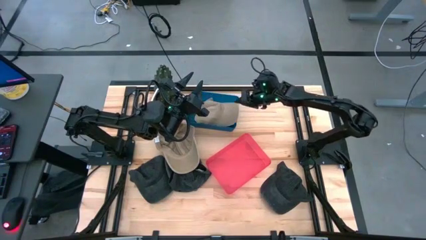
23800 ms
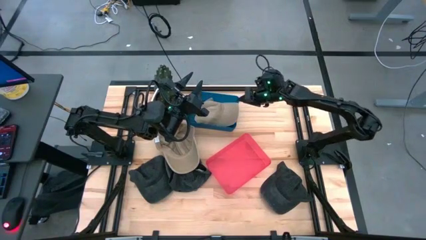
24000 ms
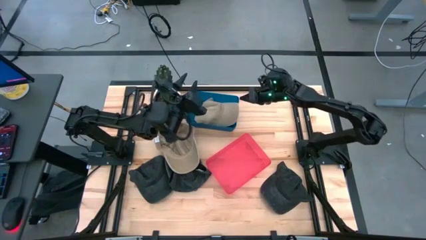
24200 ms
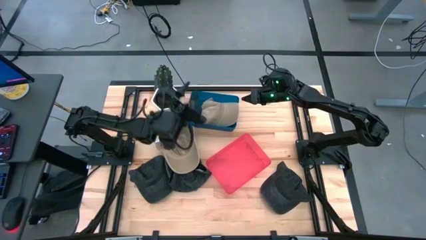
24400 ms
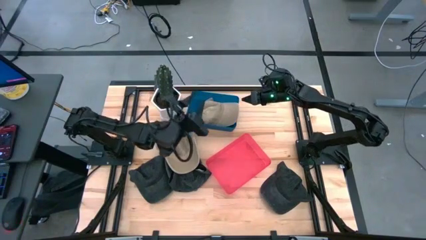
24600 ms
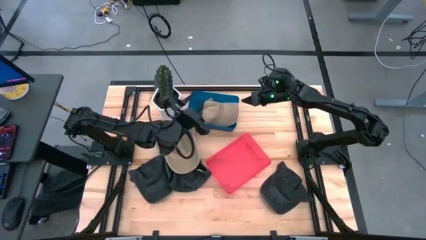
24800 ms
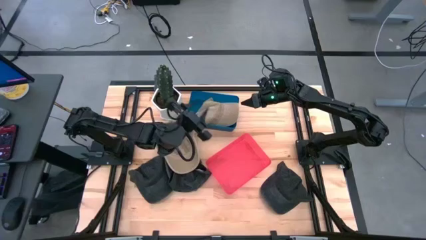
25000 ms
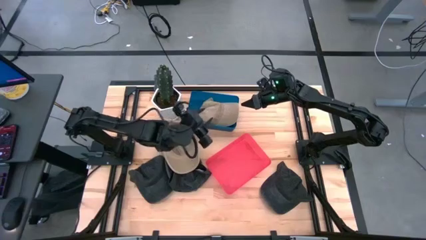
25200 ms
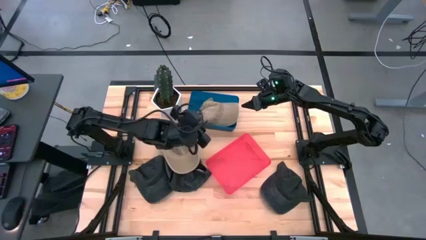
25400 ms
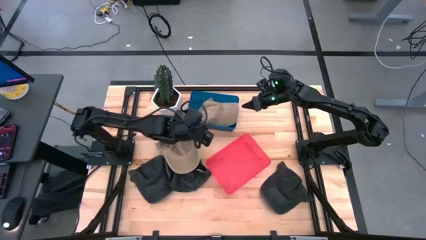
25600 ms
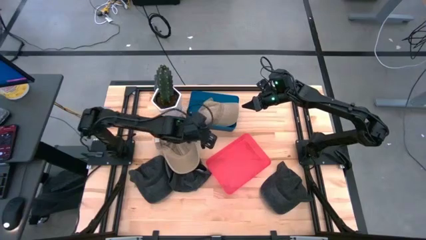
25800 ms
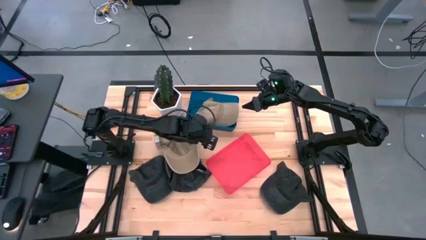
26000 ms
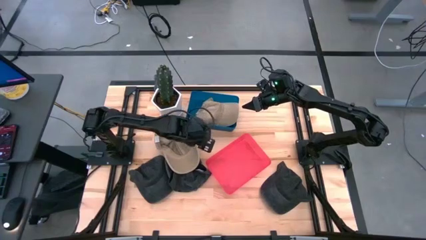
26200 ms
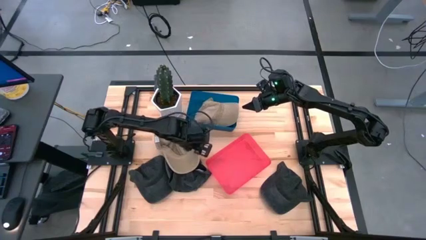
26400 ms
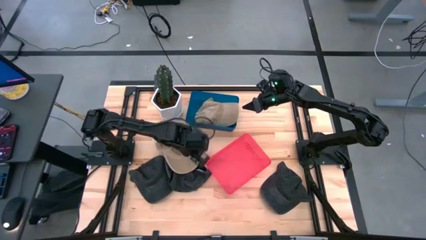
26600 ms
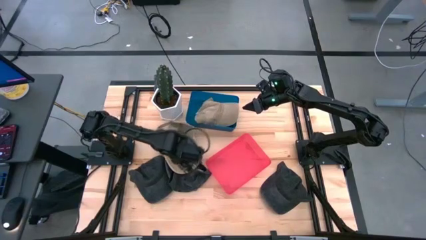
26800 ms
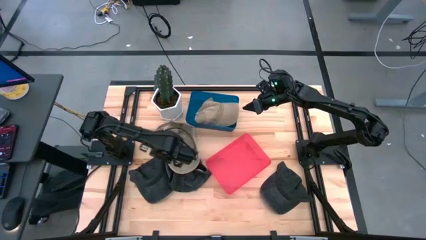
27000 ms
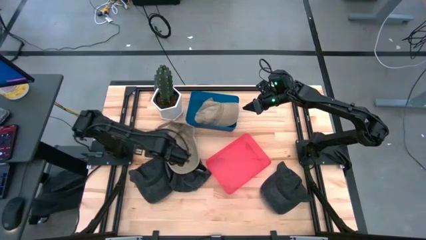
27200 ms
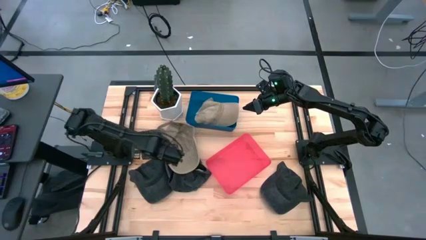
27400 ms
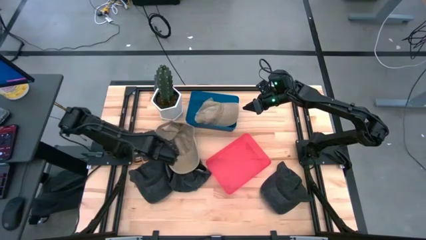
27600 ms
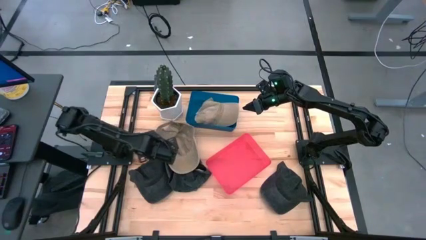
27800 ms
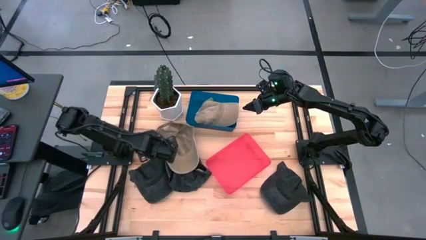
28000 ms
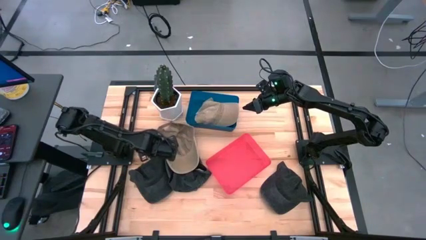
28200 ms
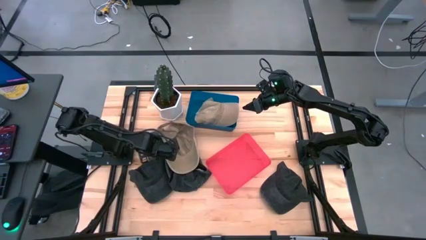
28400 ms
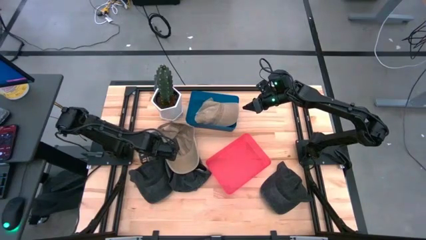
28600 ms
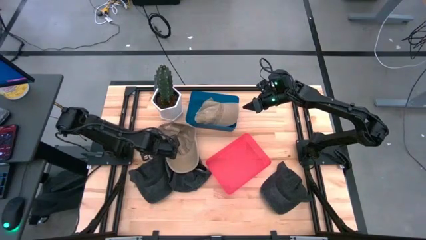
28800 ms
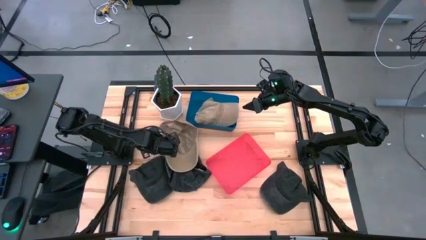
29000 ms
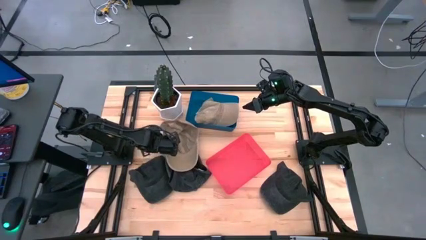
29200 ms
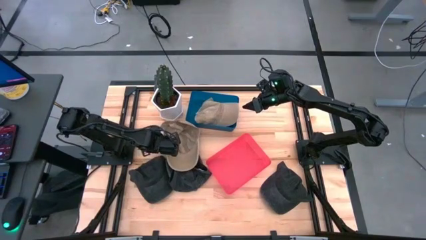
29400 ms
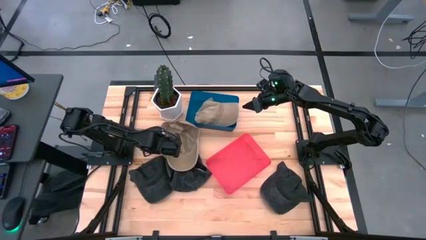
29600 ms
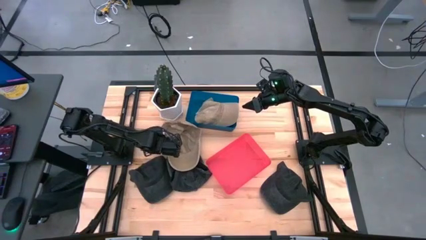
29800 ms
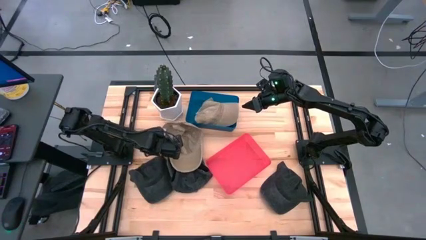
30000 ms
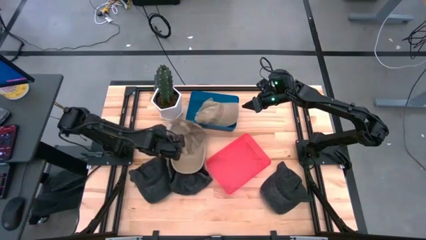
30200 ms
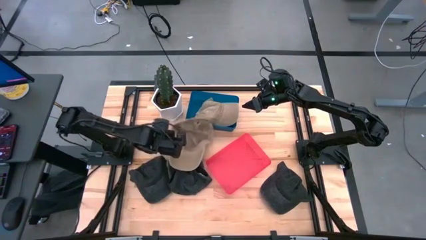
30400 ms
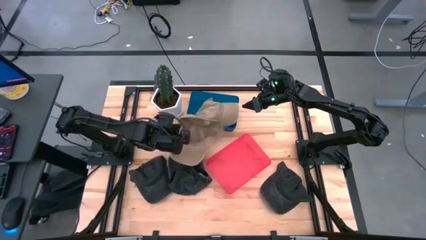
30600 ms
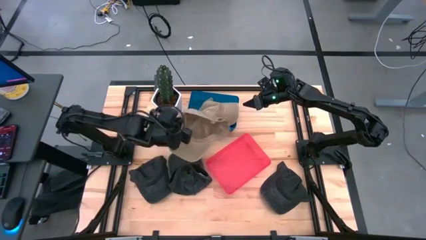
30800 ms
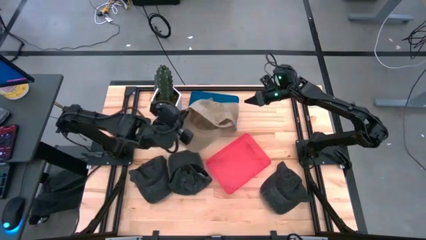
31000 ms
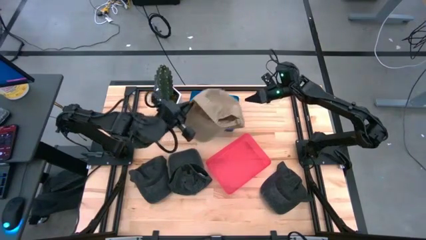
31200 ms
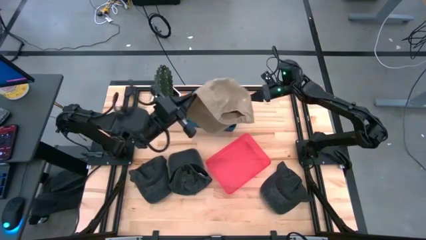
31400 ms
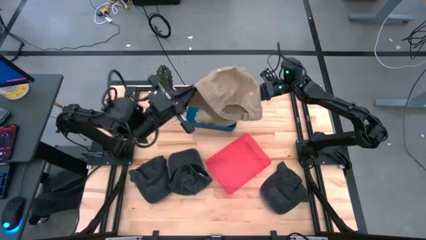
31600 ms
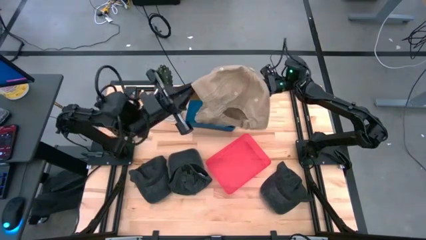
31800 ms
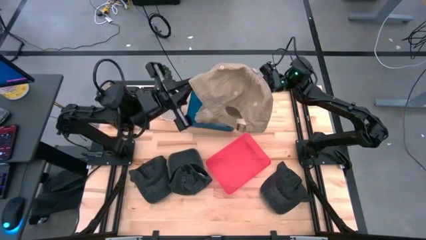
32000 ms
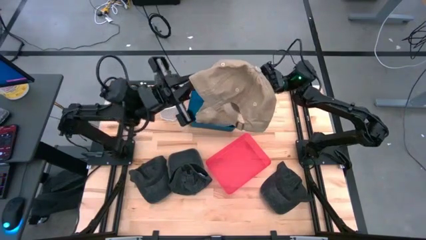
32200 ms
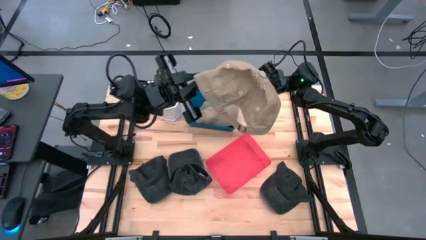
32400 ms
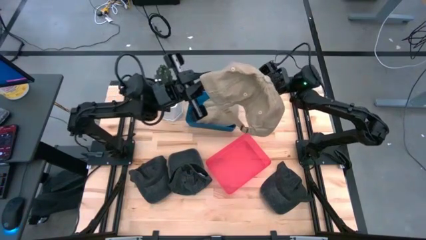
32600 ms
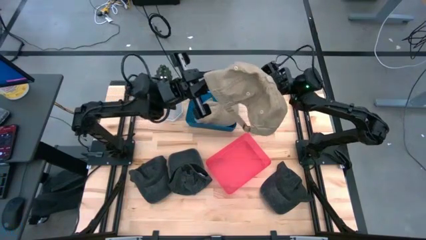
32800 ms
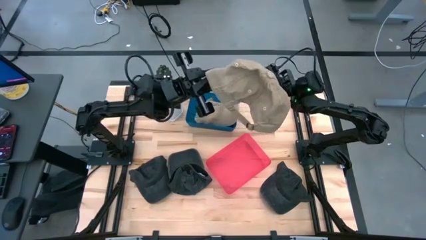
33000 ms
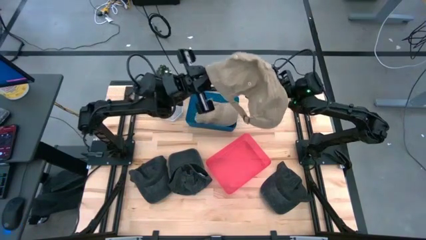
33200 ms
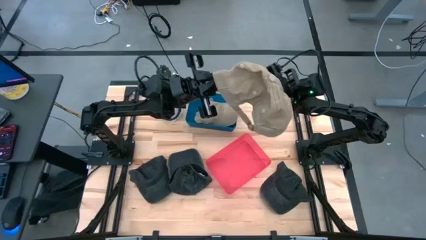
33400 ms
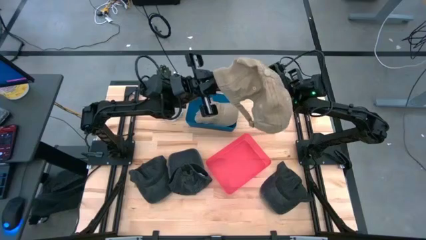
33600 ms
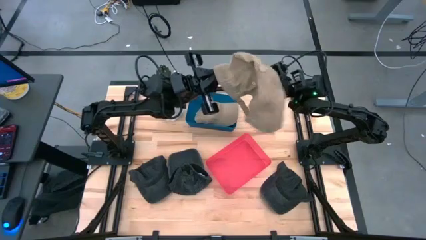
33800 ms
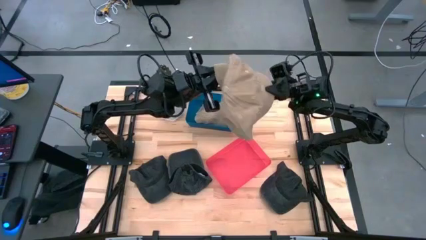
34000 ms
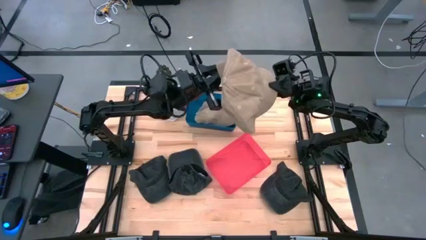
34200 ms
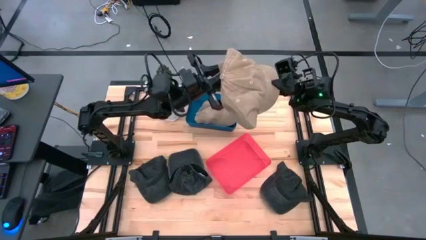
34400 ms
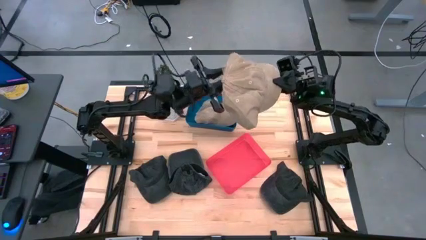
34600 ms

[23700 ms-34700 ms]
Task: Pick & Place hat
Put the brown cap into the blue bin
